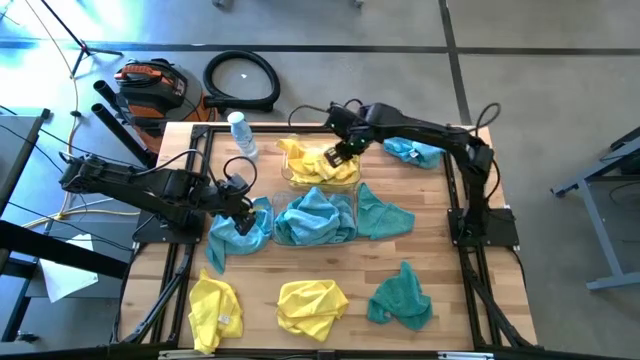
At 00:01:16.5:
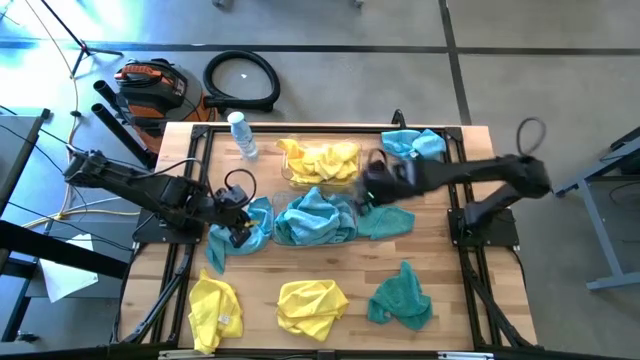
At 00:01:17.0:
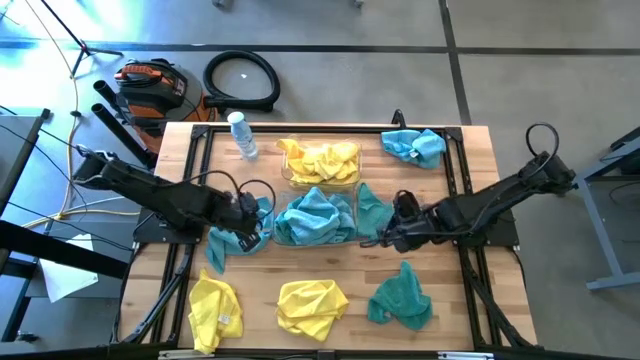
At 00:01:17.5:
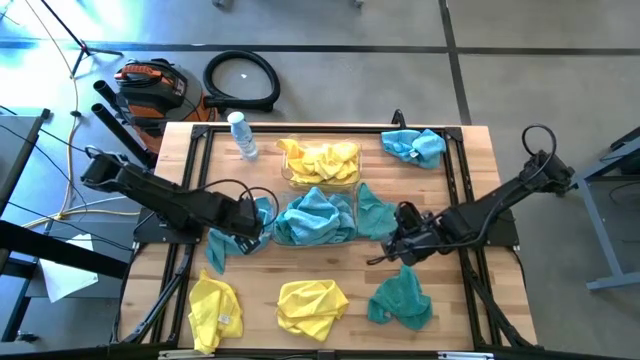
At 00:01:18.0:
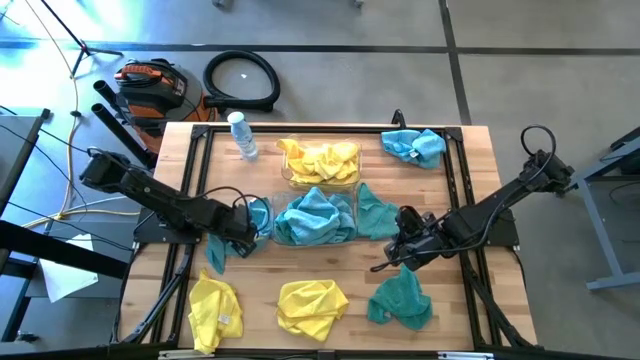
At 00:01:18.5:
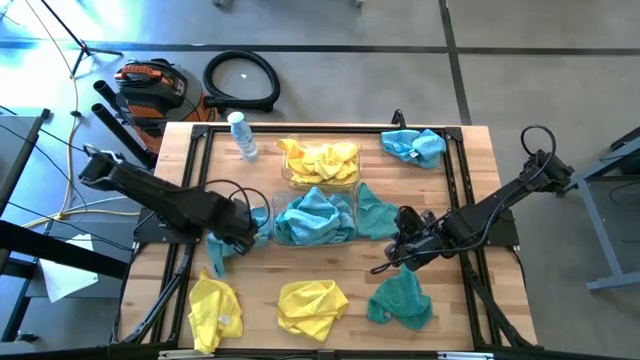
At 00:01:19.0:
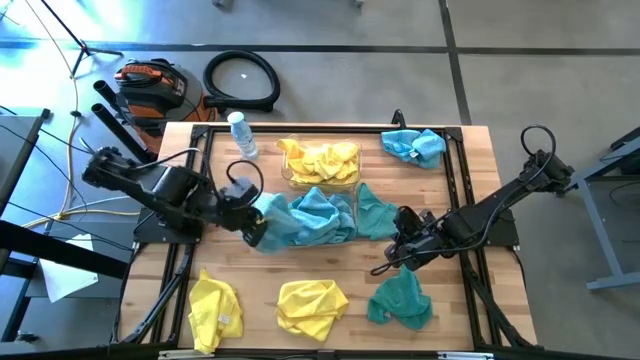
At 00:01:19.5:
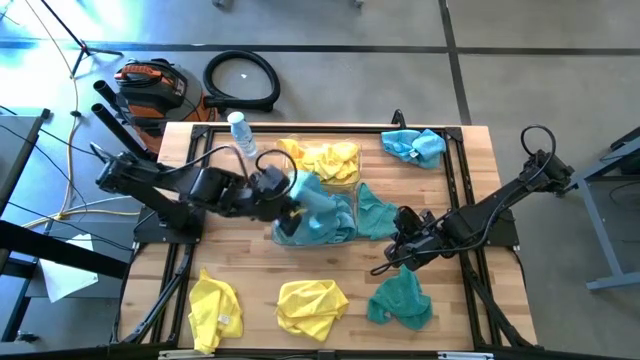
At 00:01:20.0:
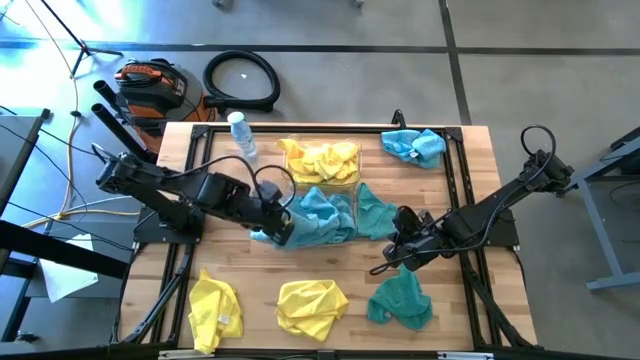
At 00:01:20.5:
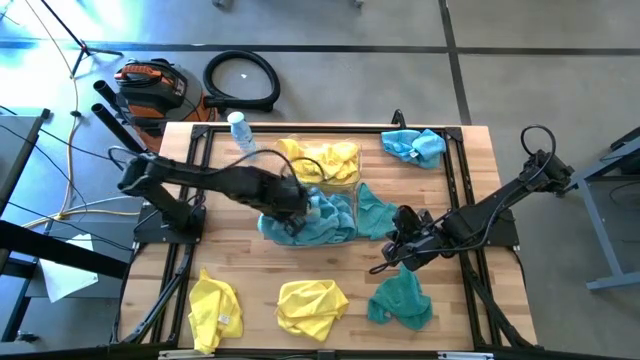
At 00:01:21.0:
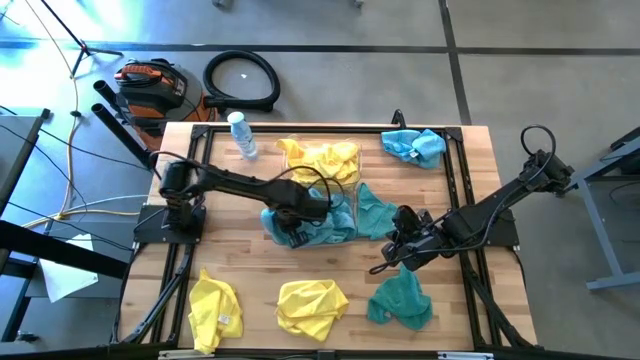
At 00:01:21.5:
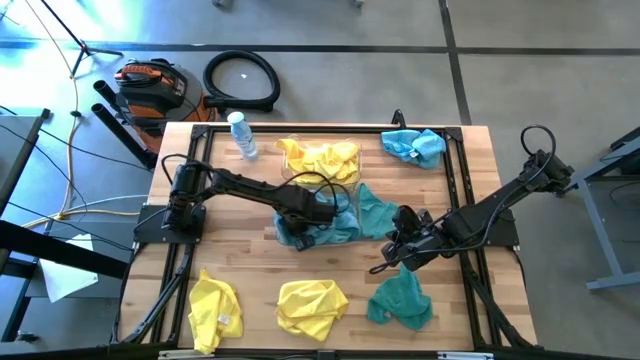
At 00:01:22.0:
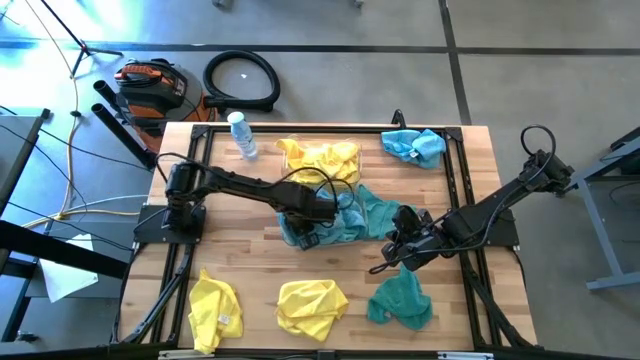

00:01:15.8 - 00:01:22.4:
Task: Sort microfiber towel by color & place in baskets
Put the blue microfiber cloth into the bottom transparent bin

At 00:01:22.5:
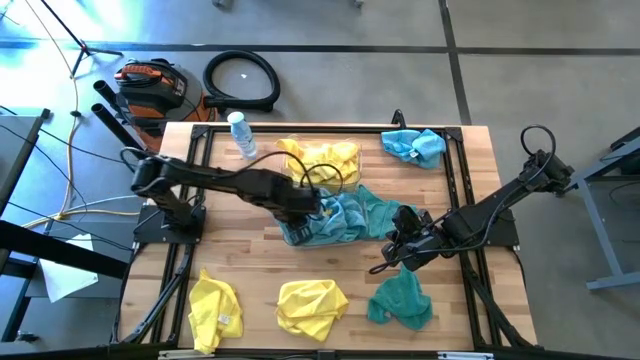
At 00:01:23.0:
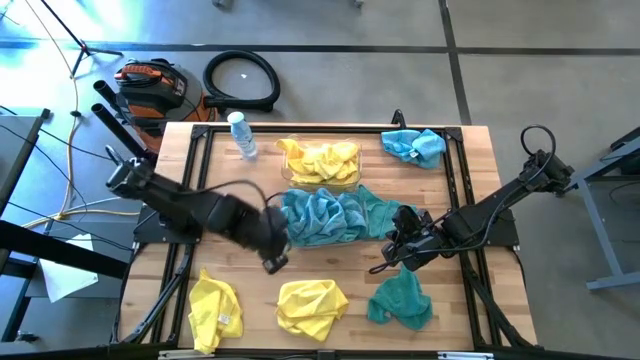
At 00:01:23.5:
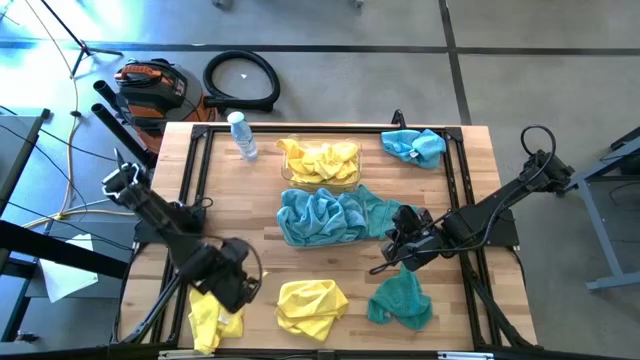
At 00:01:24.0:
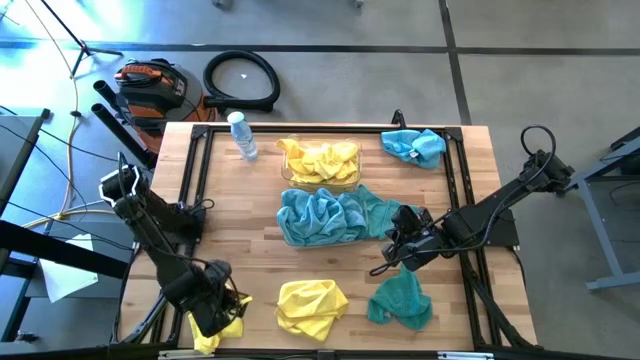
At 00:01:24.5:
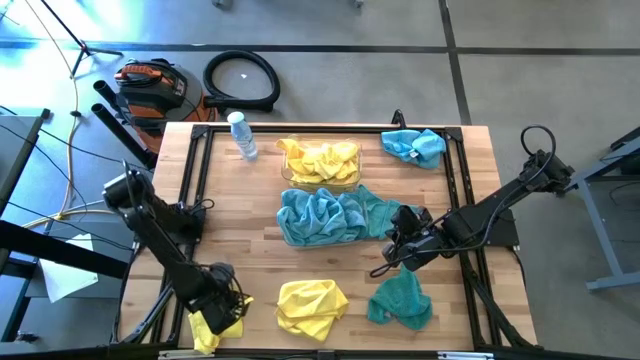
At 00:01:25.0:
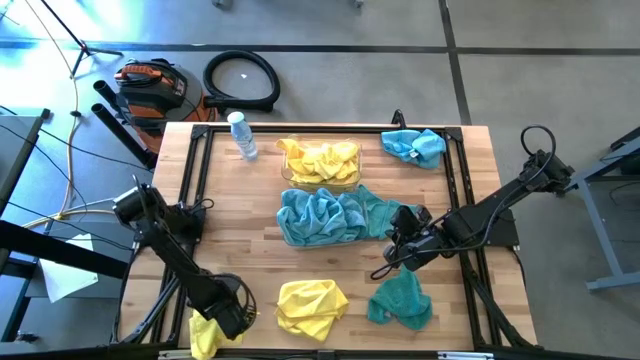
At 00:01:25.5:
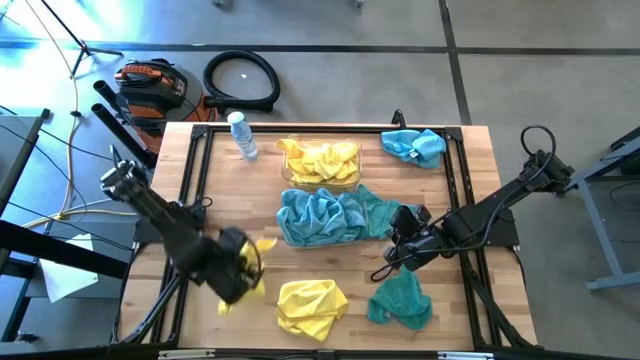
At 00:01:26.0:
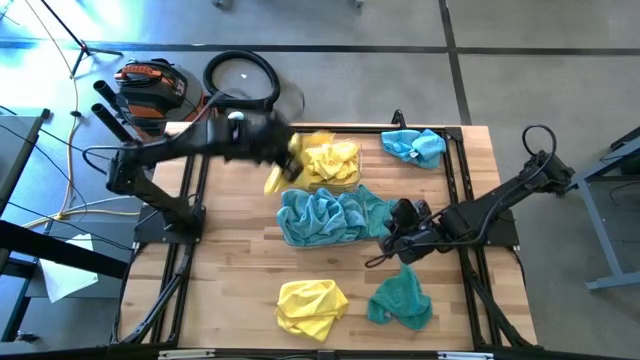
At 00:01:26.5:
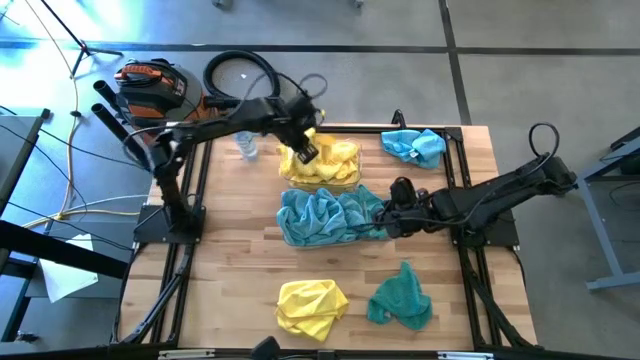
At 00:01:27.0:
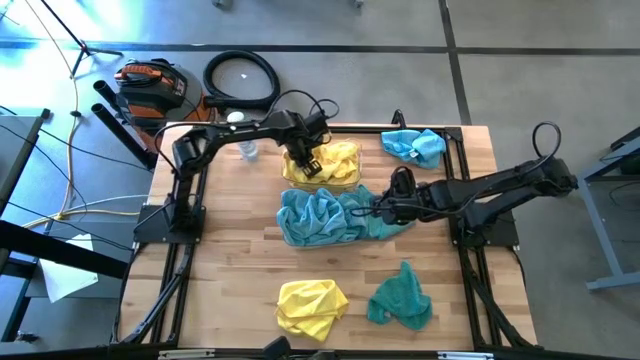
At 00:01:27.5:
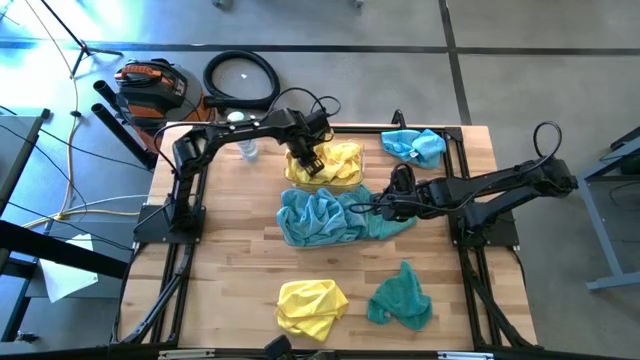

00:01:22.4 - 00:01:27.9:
Put the yellow microfiber cloth into the top transparent bin

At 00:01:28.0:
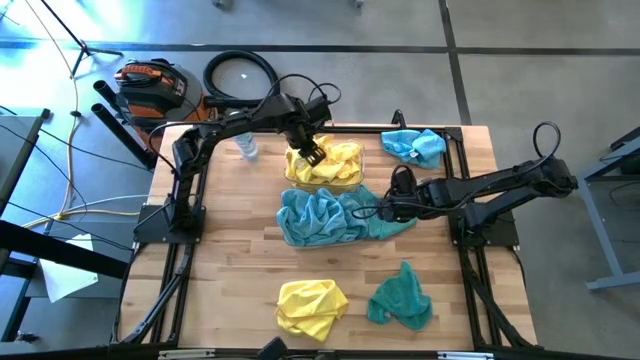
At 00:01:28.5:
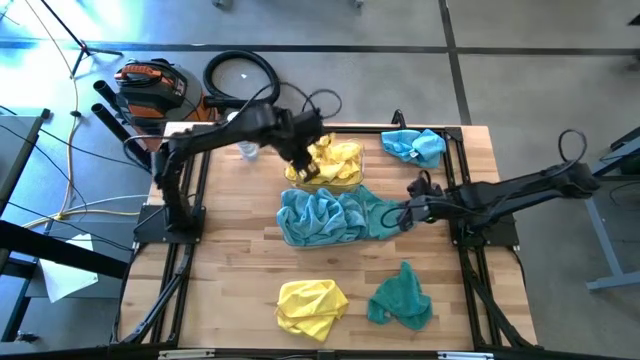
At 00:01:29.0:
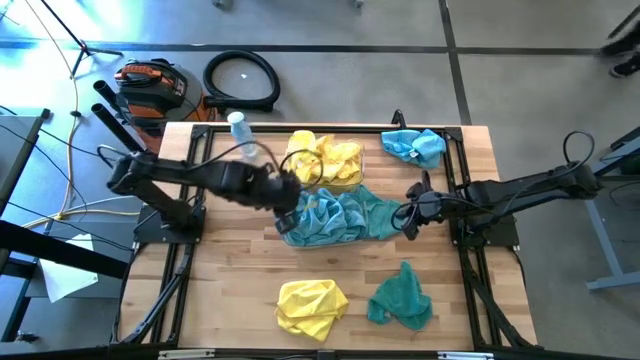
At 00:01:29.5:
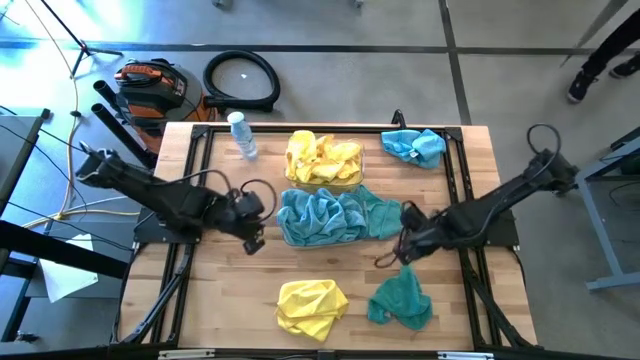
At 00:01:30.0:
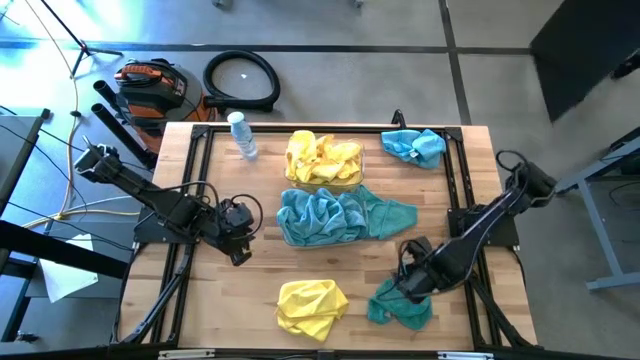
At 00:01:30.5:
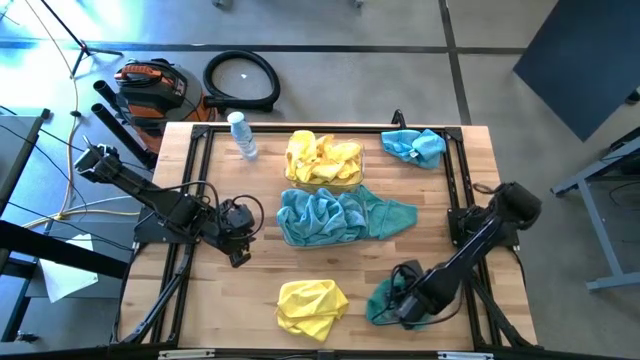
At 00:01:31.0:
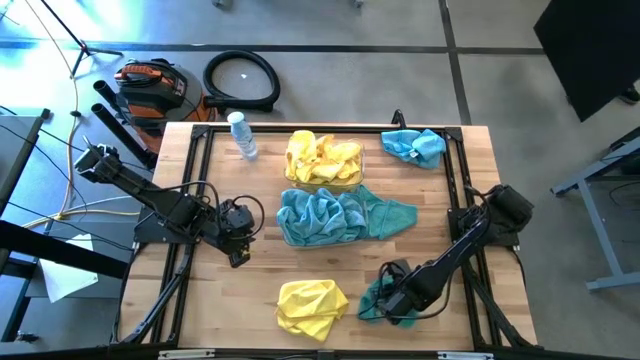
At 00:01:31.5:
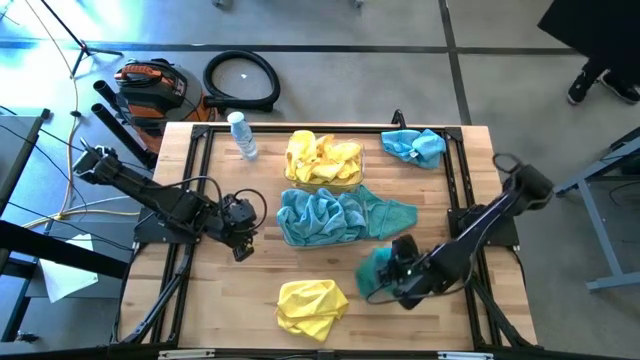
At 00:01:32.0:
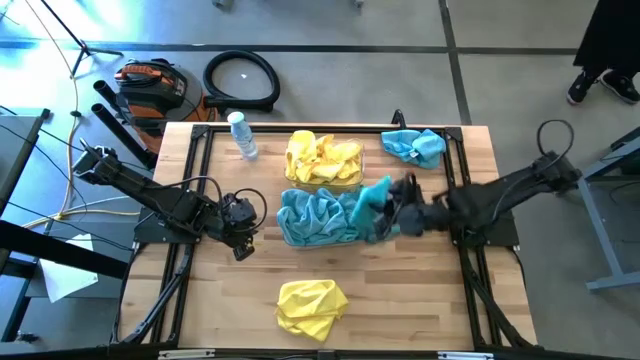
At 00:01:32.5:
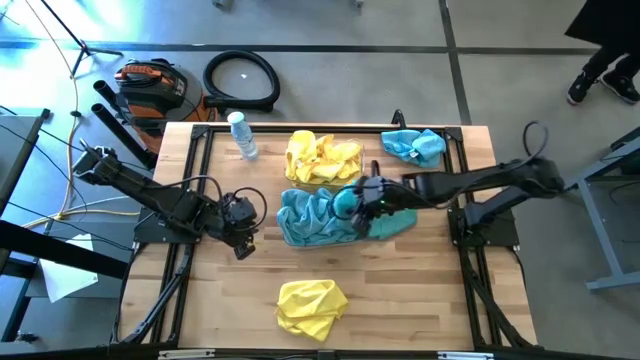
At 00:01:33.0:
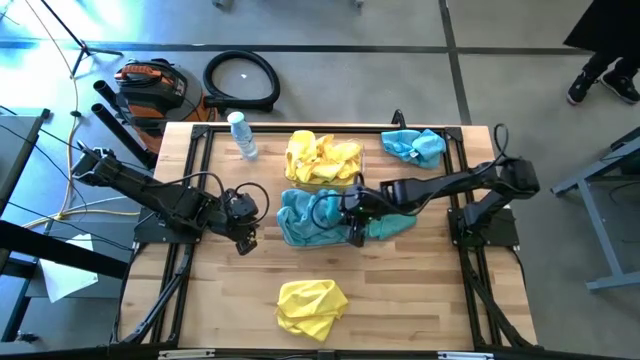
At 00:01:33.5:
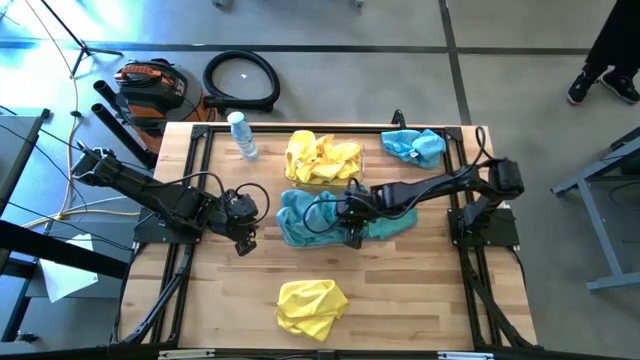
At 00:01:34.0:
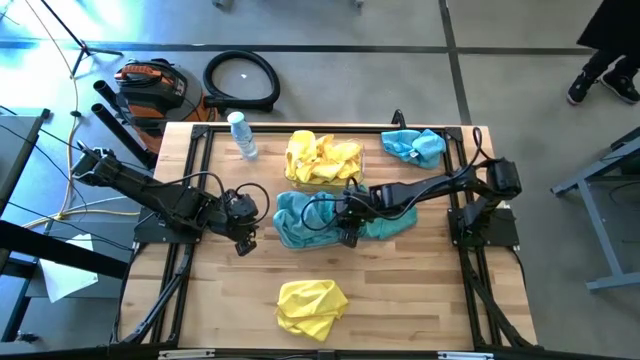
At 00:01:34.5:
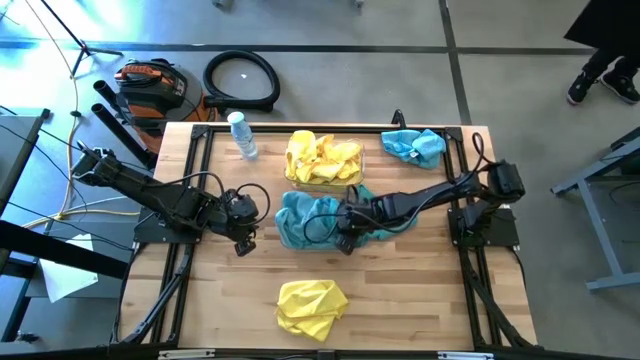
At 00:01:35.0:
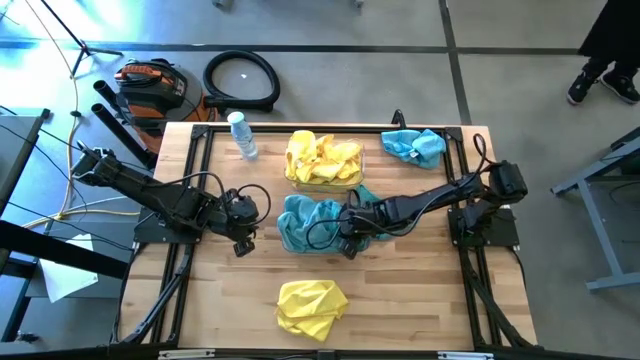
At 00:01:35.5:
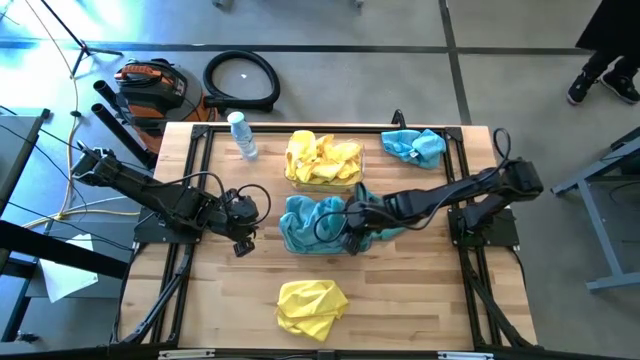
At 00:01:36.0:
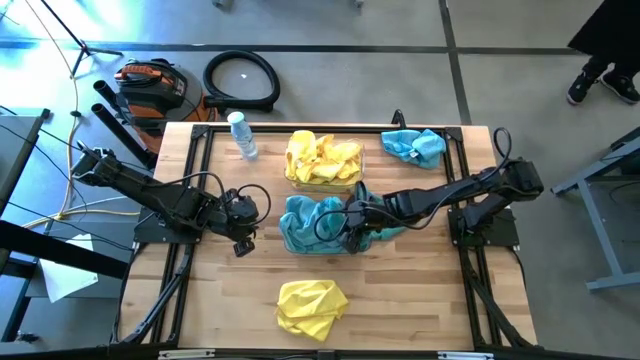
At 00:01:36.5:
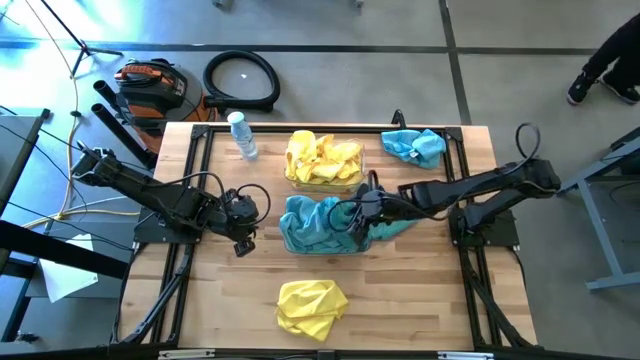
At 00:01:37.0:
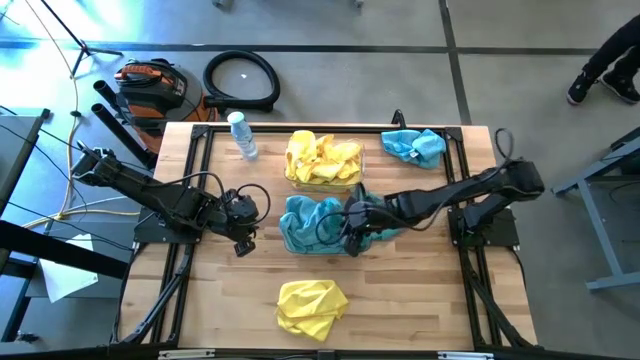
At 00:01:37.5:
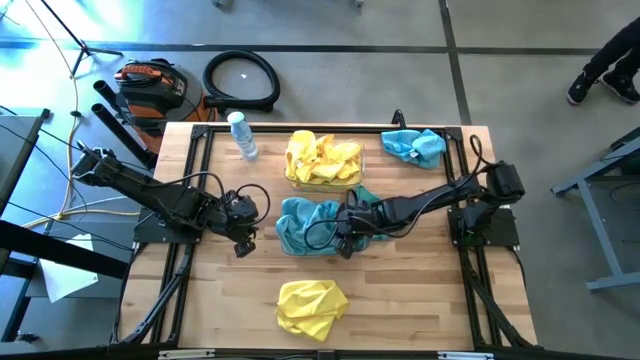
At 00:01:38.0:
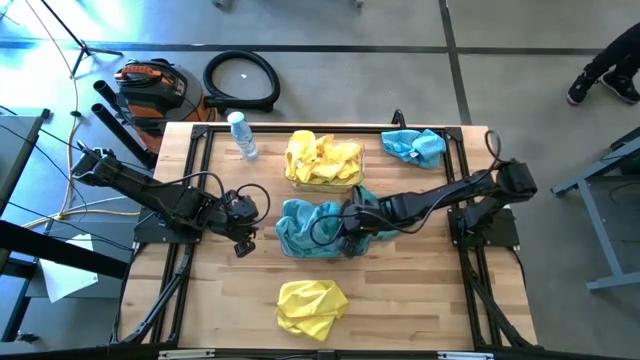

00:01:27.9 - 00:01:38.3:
Put the blue microfiber cloth into the bottom transparent bin
